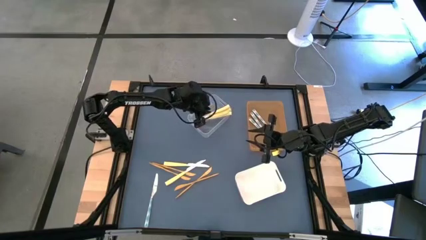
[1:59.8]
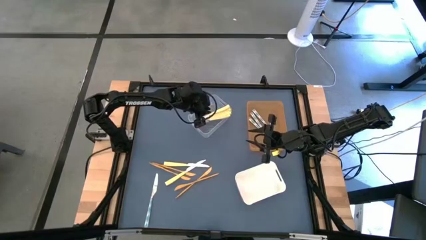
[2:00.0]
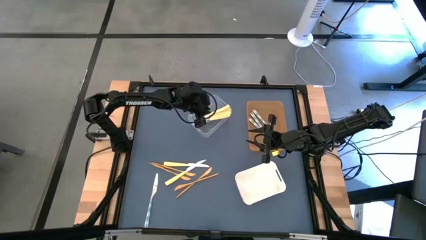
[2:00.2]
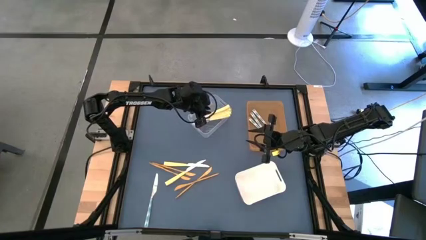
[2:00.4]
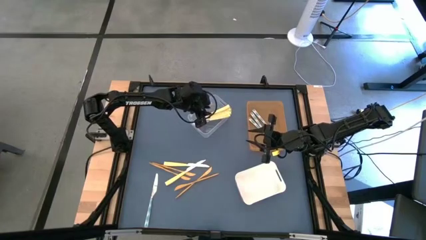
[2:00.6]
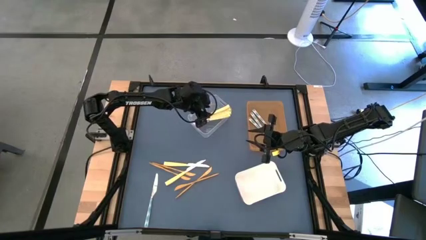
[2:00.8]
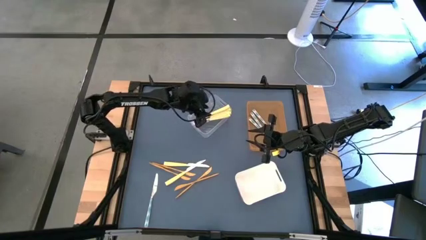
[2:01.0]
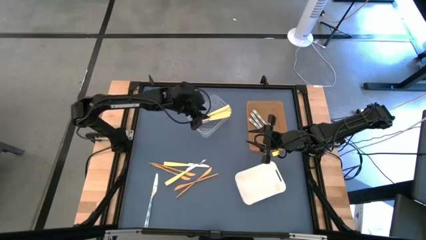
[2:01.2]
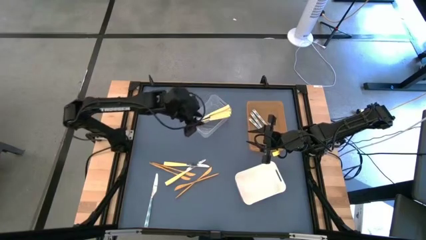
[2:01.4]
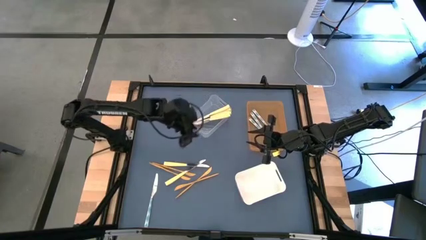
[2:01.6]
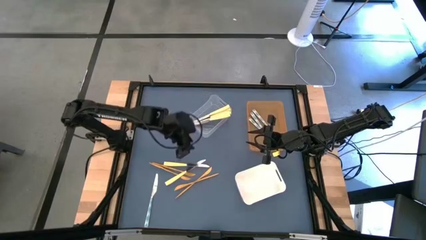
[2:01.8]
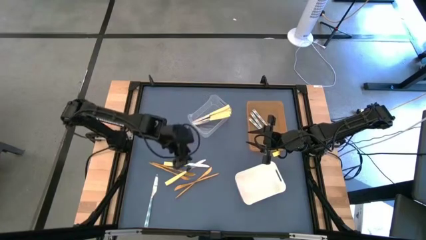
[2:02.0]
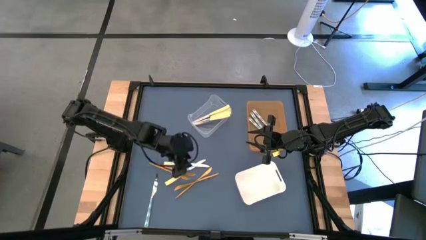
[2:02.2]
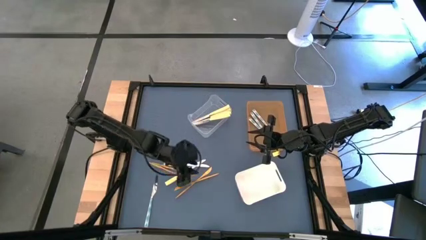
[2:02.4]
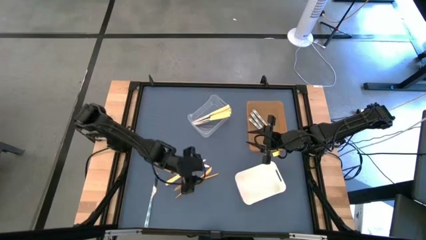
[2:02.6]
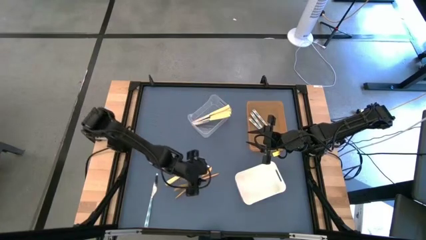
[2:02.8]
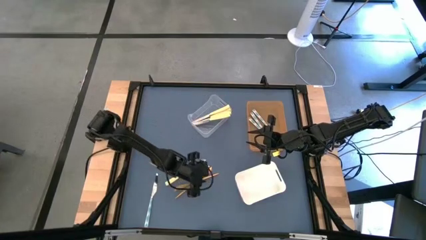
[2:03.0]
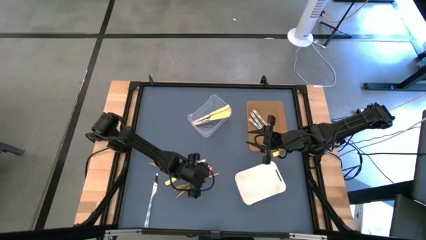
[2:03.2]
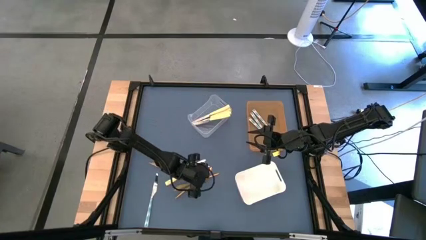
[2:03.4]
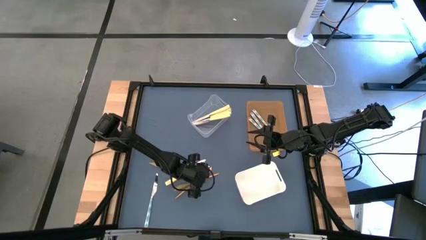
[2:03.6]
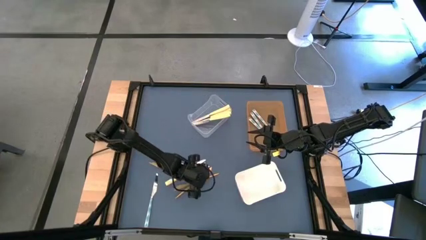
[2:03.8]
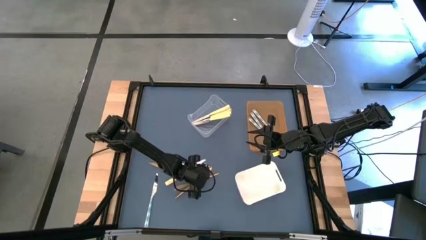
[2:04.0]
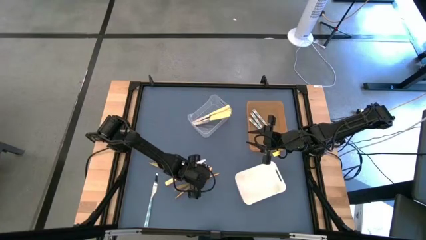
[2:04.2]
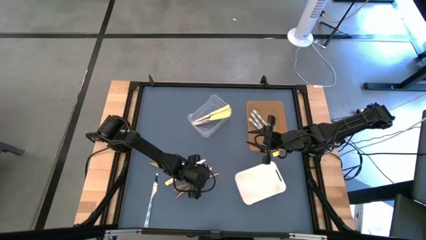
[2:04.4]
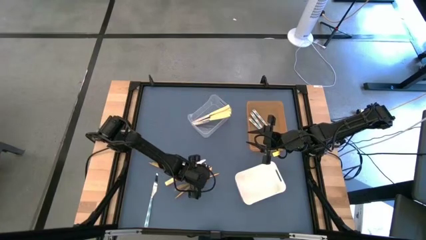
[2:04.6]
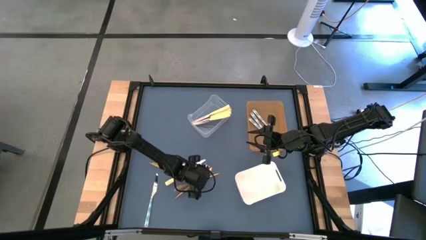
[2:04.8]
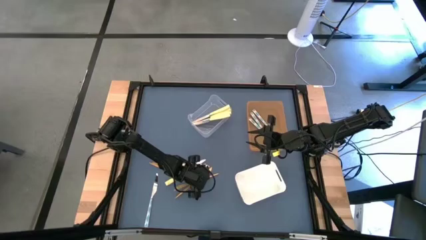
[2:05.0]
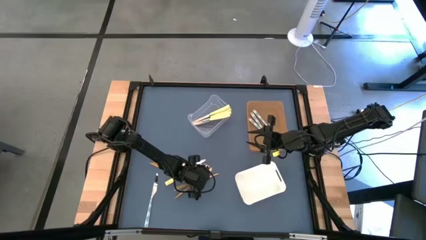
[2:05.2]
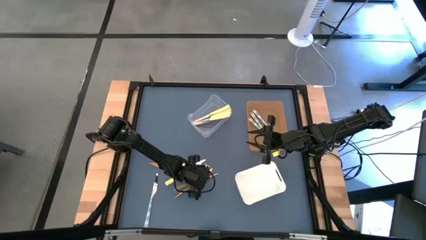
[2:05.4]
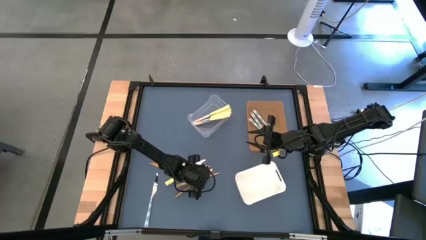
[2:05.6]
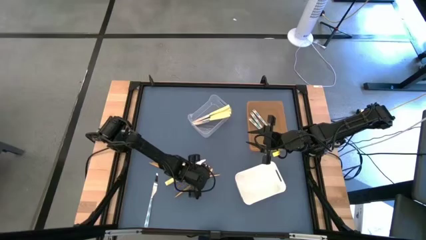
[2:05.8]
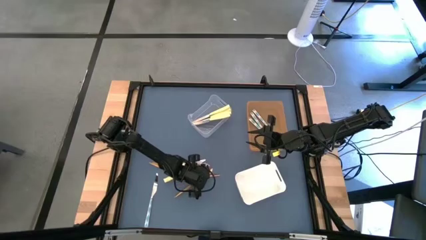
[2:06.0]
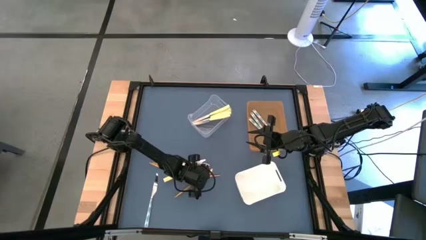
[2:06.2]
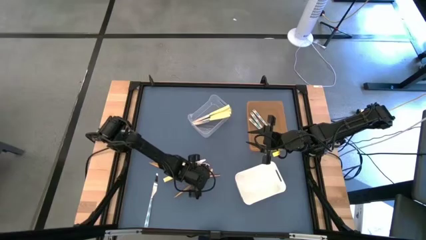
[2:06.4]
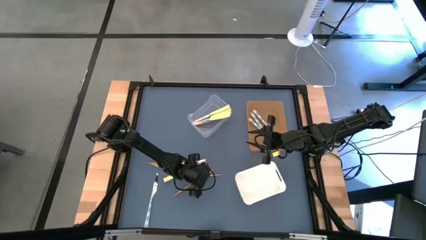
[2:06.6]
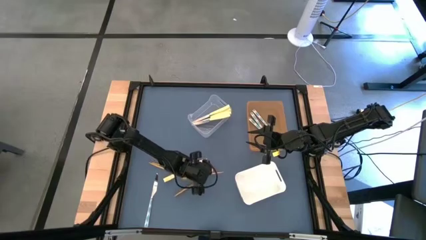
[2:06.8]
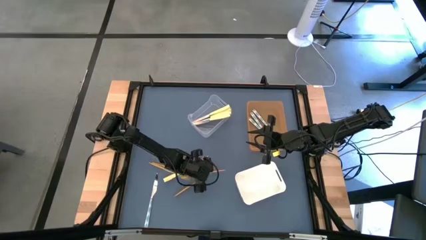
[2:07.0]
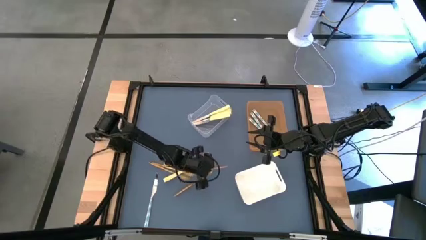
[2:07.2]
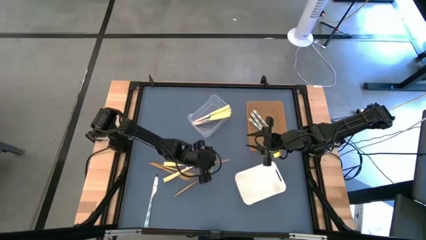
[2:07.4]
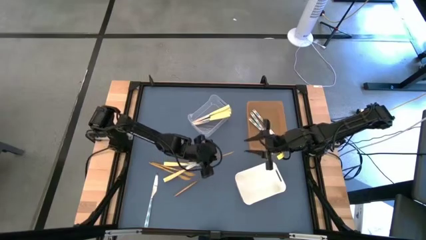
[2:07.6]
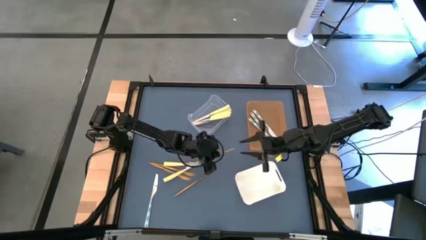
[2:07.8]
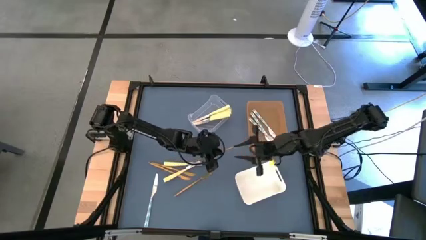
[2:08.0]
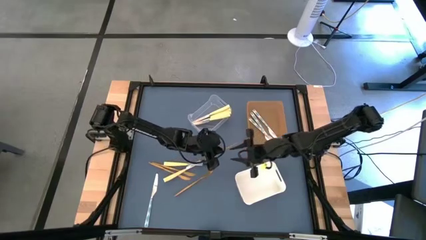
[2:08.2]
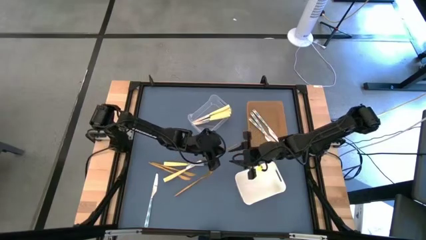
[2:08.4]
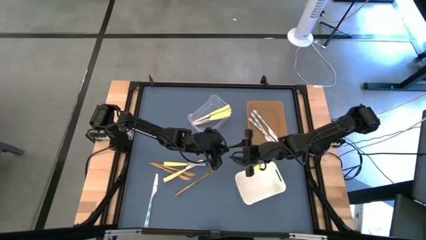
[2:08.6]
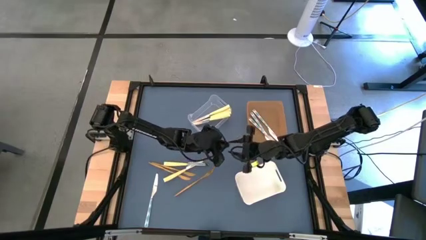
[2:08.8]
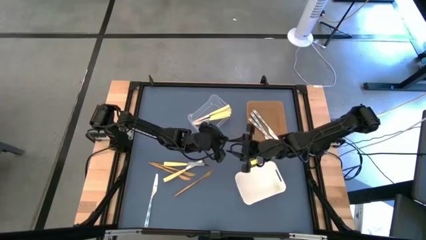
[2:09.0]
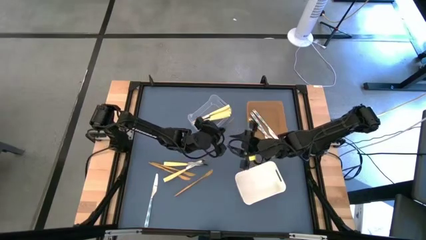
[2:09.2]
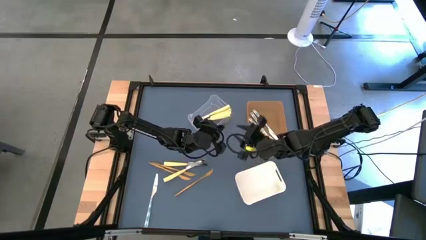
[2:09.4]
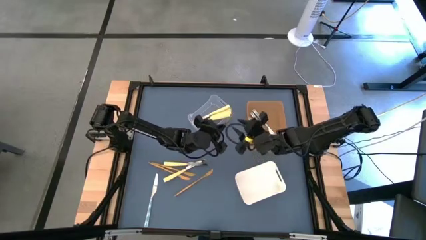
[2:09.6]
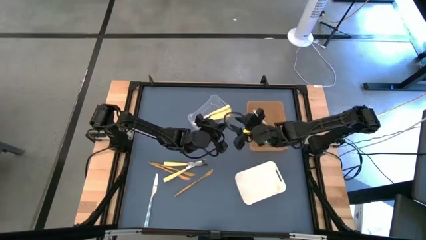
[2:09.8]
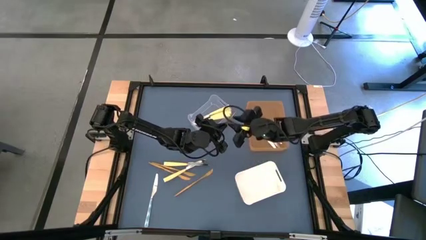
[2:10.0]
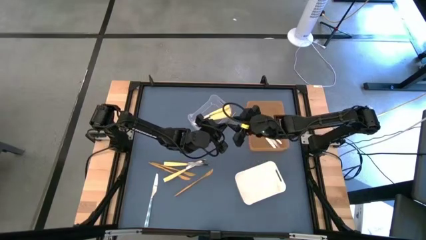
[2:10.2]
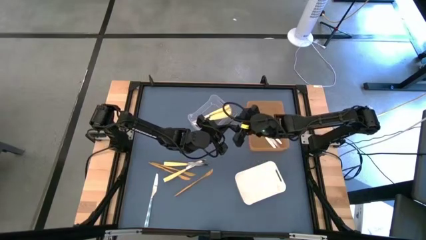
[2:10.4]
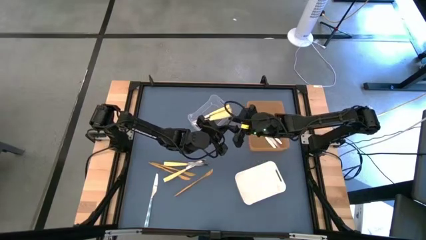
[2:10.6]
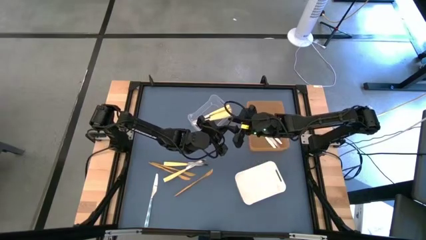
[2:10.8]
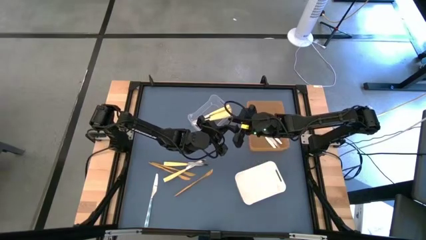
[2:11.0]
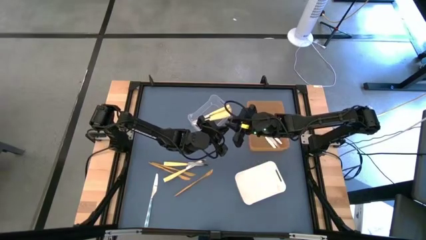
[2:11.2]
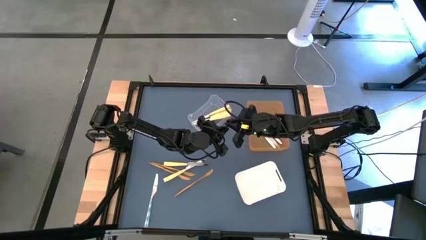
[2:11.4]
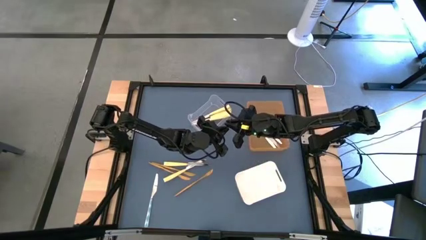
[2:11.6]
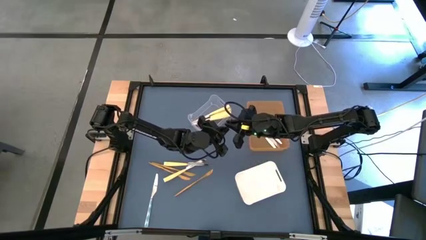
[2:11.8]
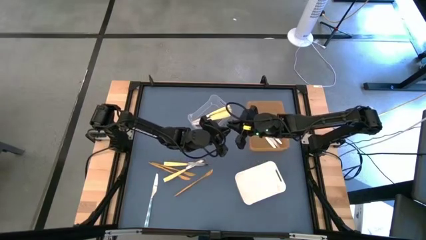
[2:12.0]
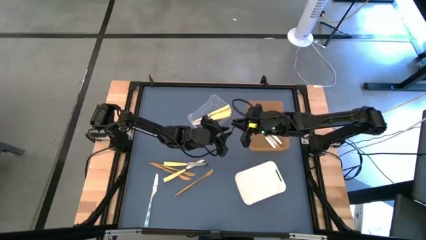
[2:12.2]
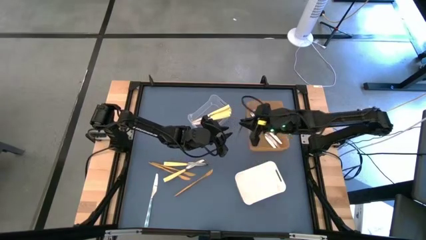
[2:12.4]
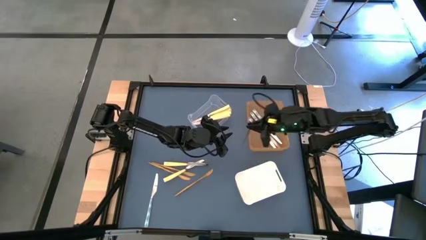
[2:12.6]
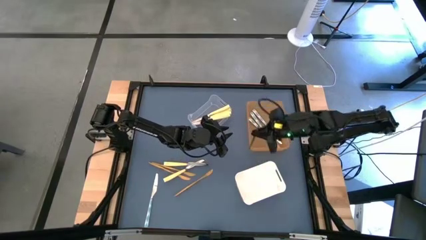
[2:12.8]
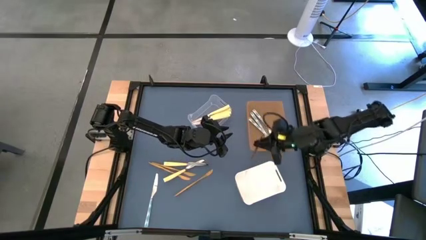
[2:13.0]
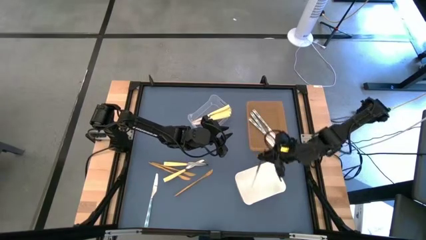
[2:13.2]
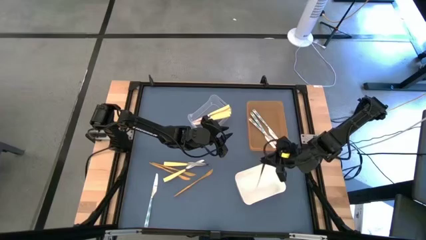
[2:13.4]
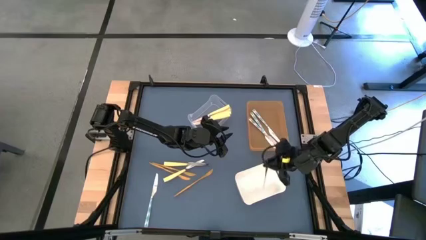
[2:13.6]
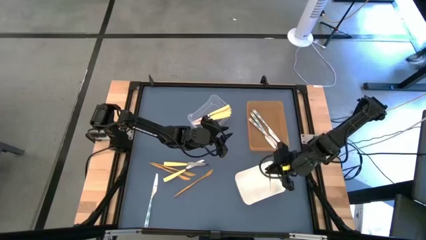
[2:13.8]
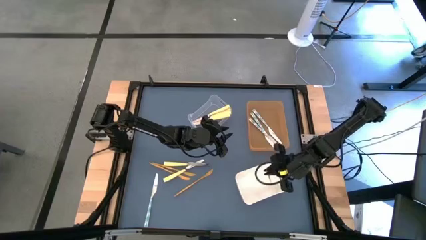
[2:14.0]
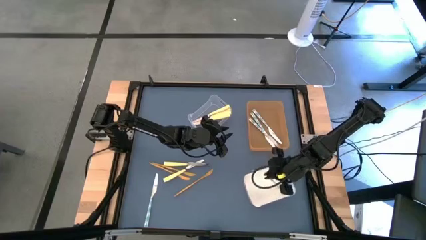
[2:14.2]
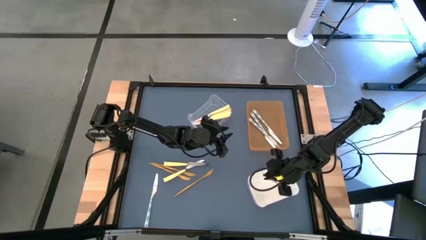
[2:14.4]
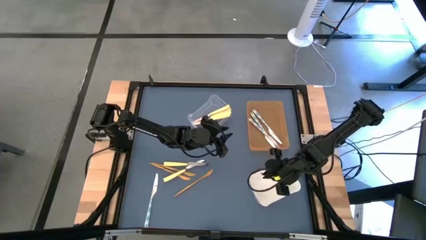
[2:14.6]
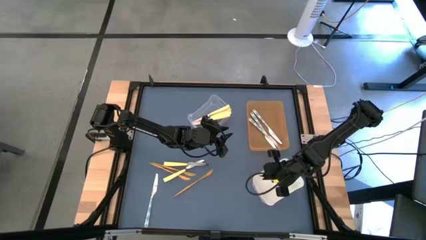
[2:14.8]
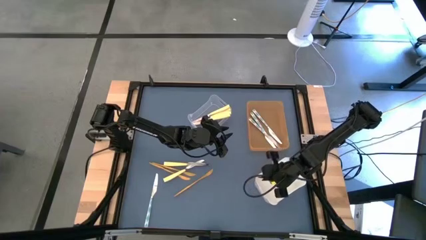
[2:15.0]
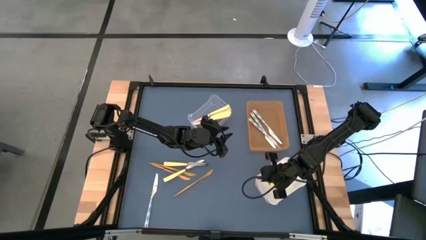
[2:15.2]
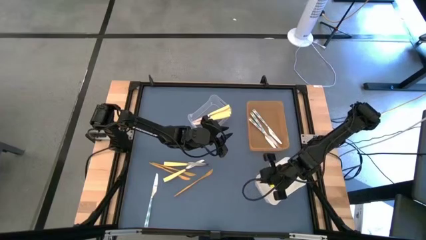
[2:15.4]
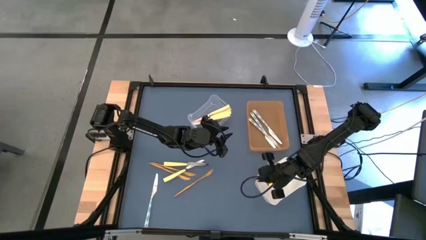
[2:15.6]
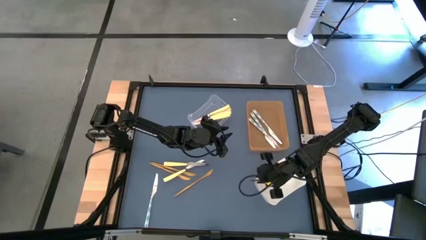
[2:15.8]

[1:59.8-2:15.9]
Task: Sort silverware by color (type)
Put the gold knife into the white bin
